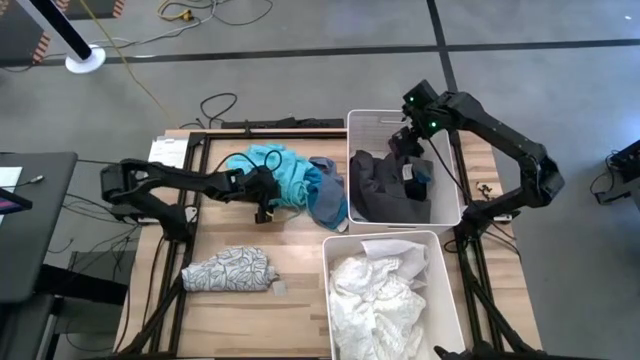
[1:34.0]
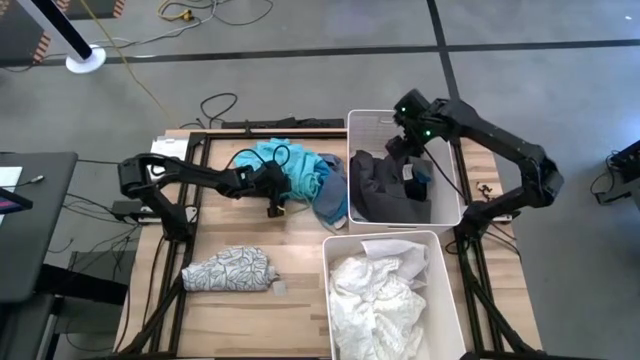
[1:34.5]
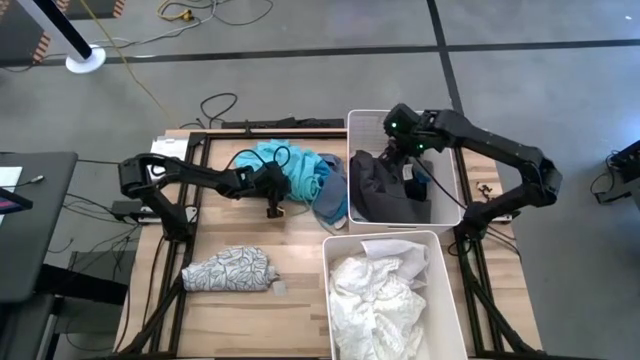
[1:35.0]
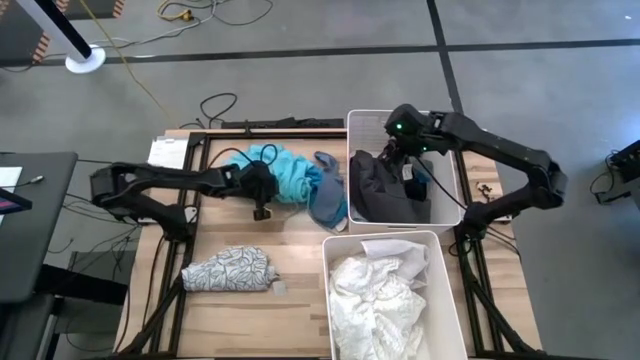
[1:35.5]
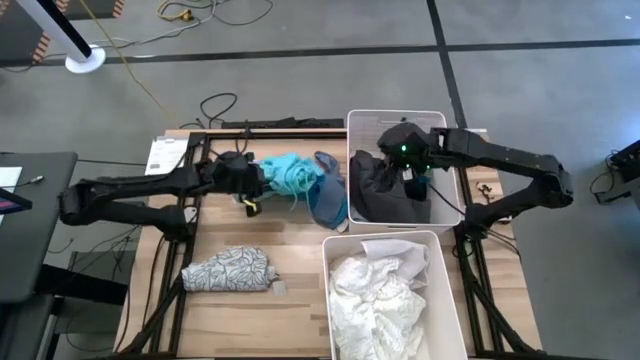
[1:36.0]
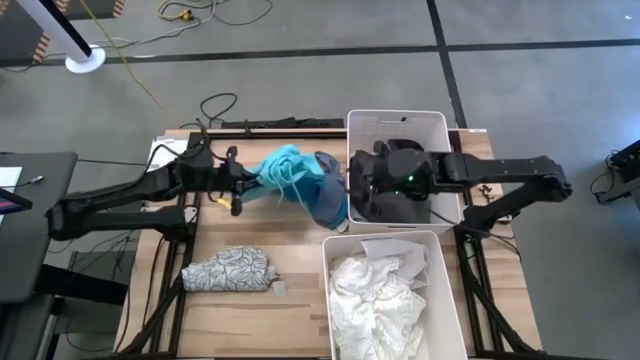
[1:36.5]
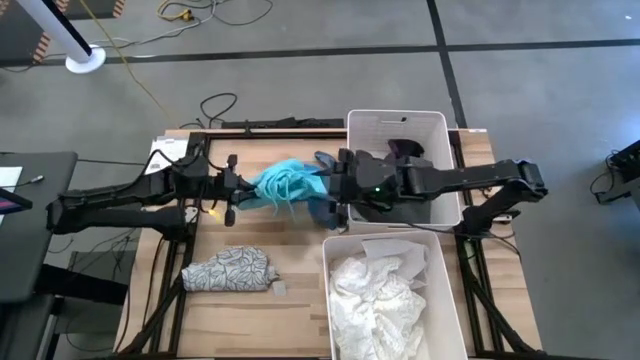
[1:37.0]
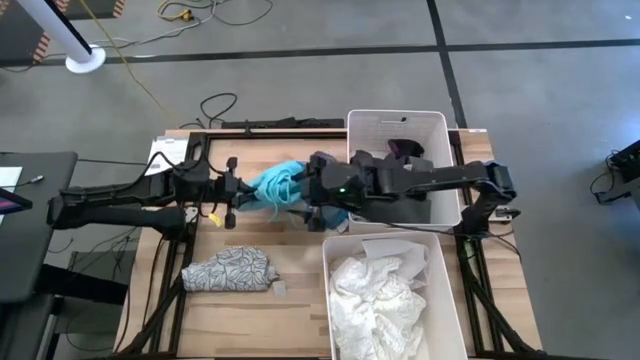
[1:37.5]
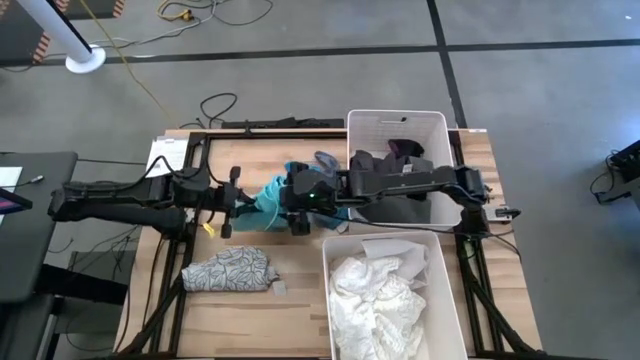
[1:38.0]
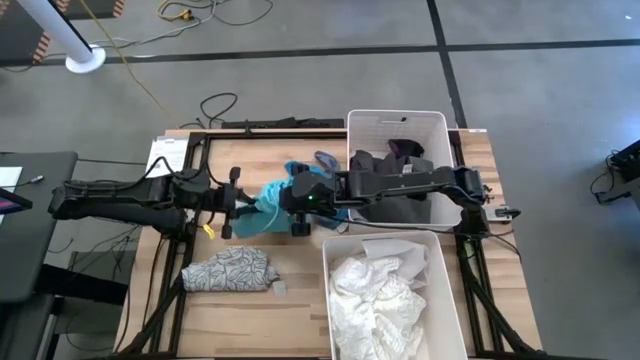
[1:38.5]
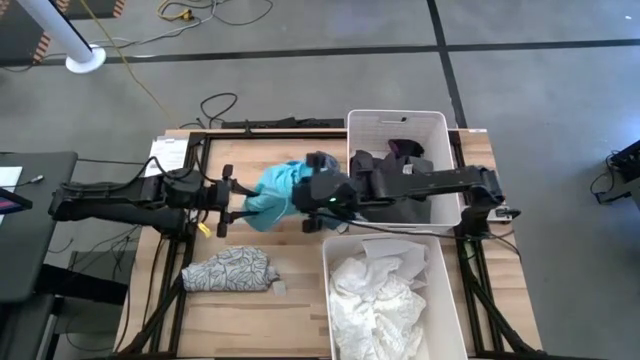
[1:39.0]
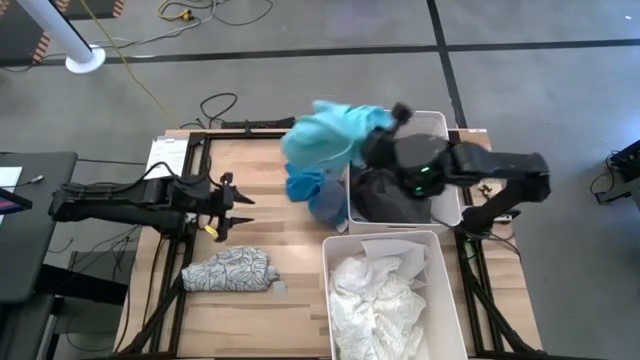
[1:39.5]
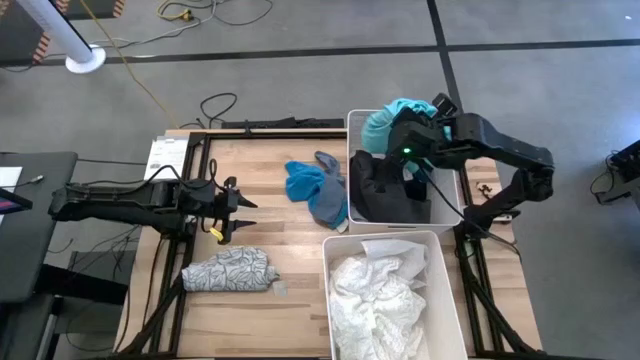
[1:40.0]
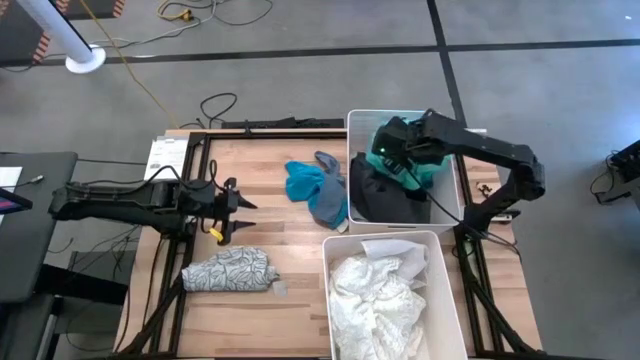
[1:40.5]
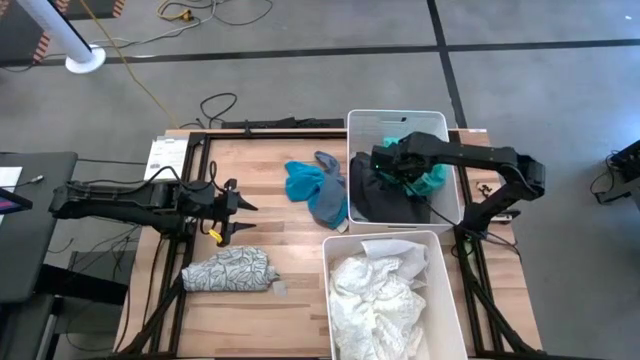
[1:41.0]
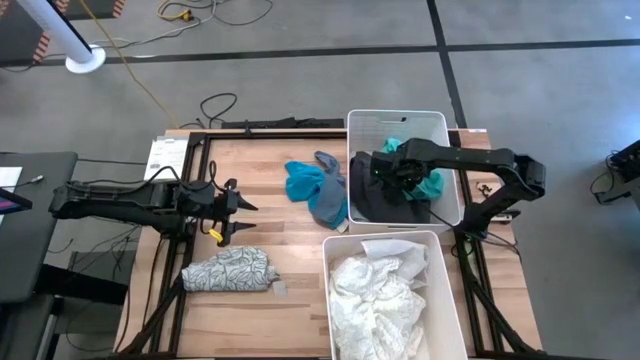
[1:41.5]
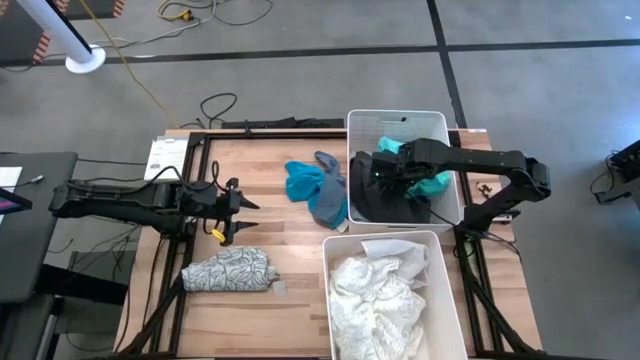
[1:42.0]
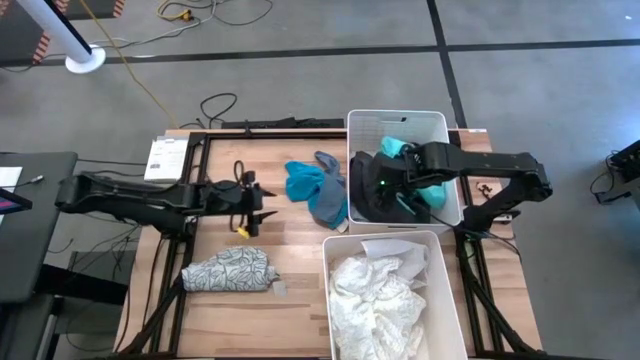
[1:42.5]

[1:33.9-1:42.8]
Task: Sort clothes
Put the light blue shorts into the top white laundry bin

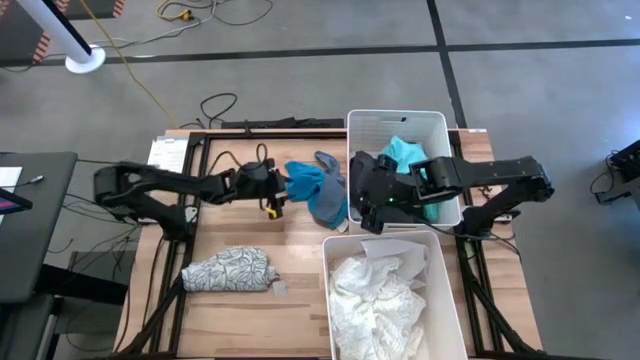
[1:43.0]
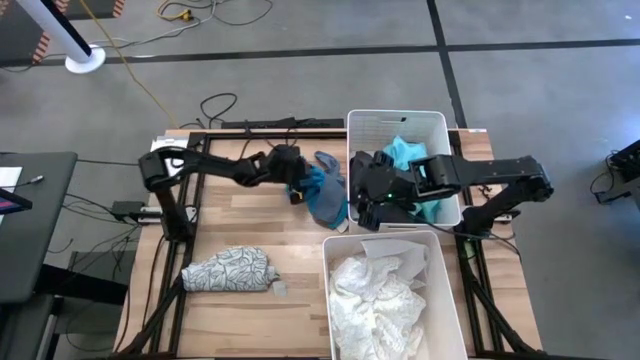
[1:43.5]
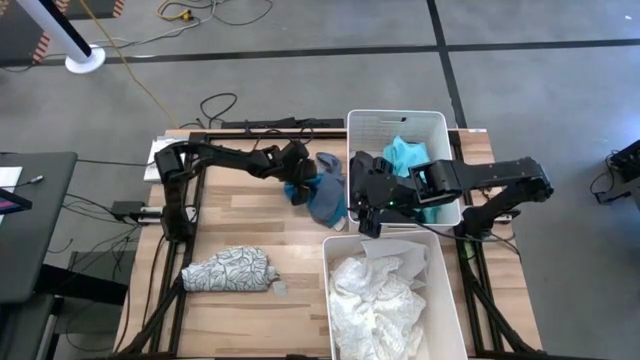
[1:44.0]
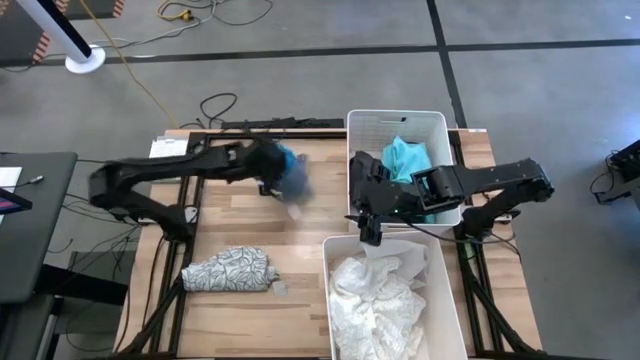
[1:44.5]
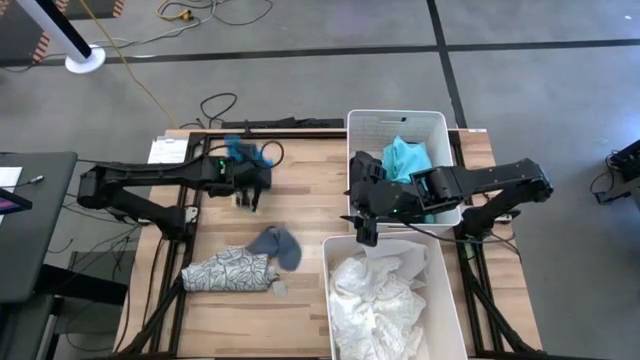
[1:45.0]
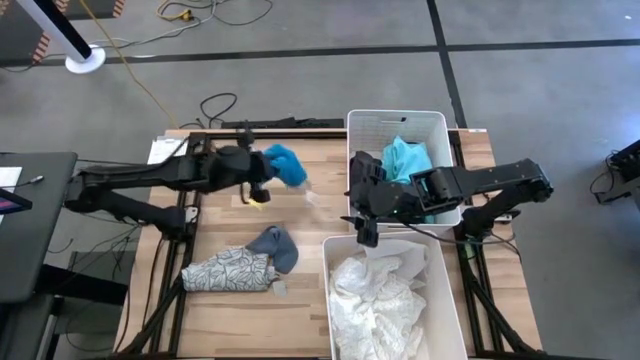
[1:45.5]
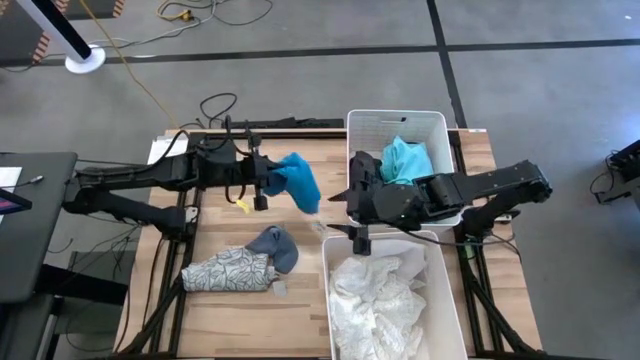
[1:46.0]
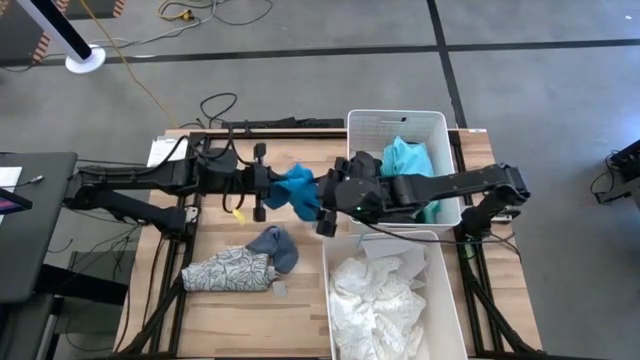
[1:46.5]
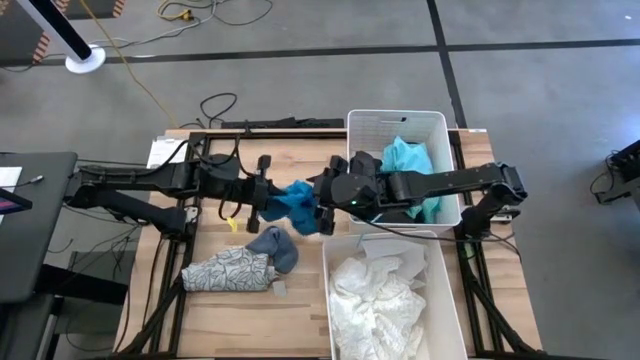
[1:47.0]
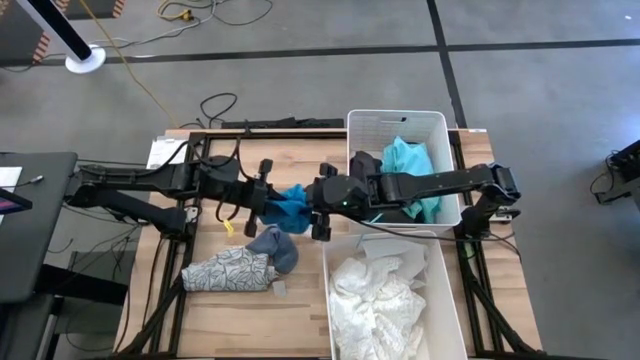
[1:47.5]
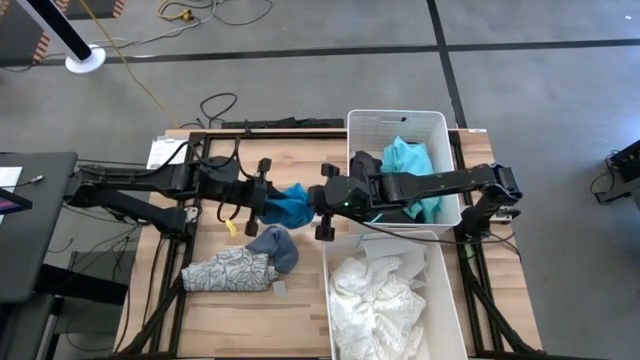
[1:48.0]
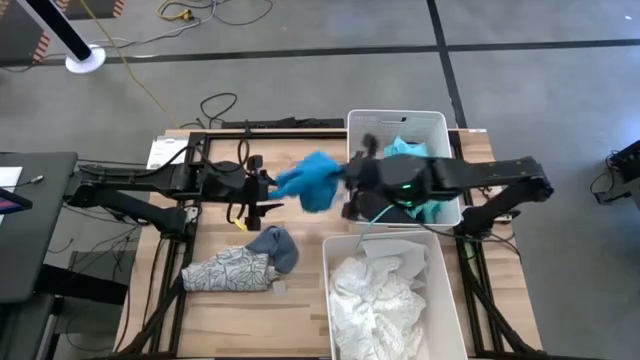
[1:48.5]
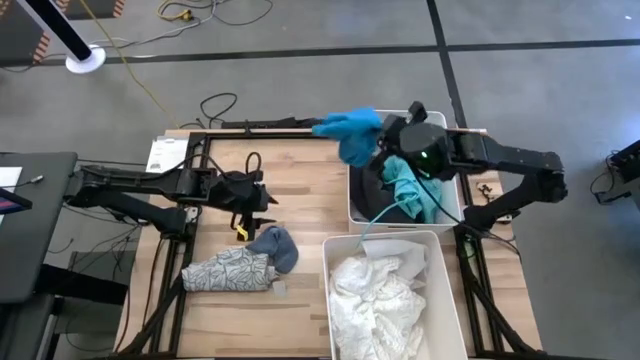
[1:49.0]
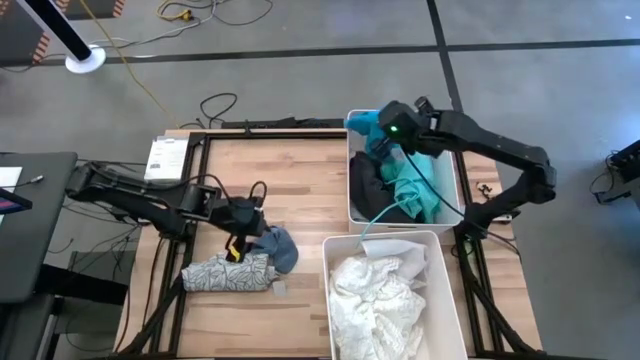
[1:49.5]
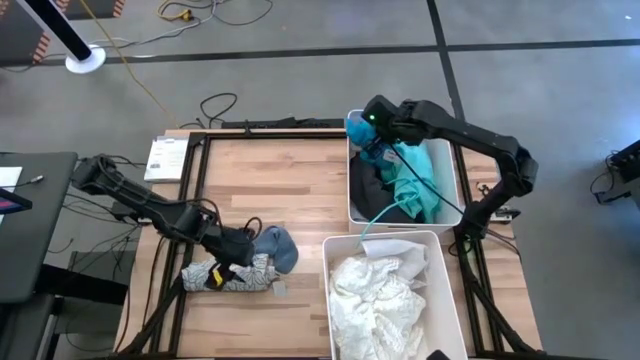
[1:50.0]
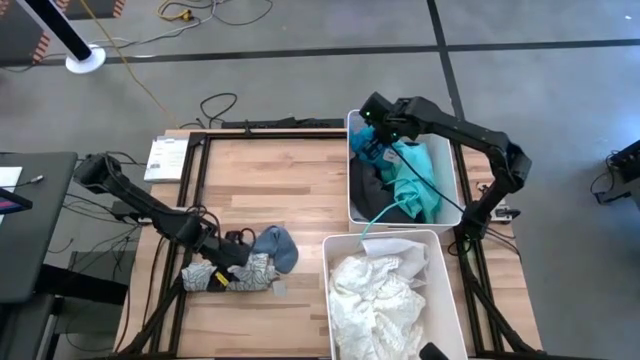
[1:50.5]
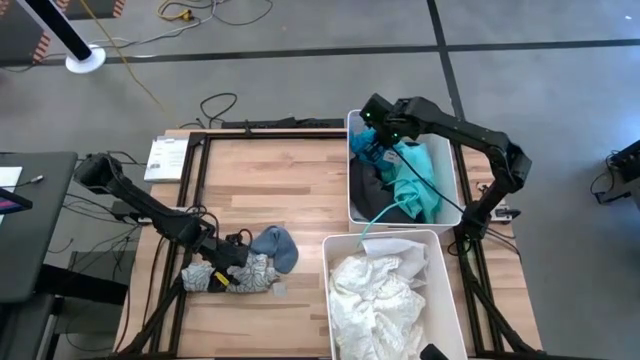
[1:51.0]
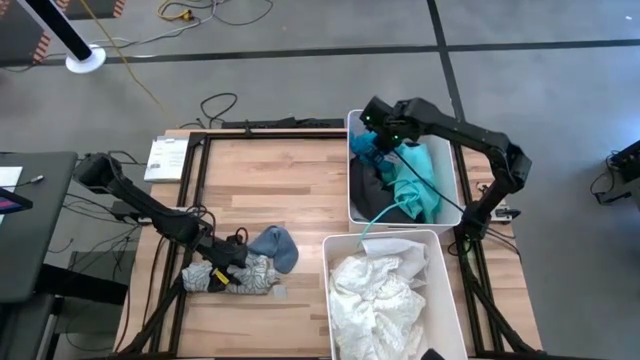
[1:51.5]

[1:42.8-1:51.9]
Put the blue short into the top white laundry bin

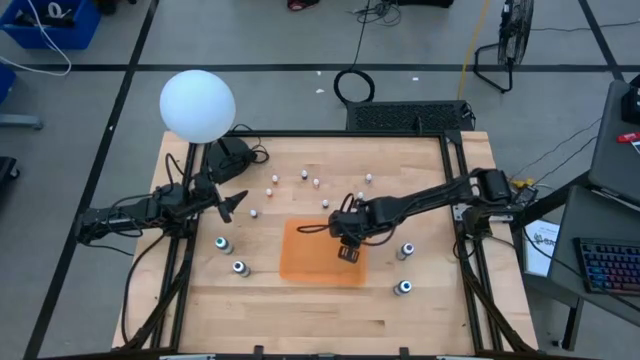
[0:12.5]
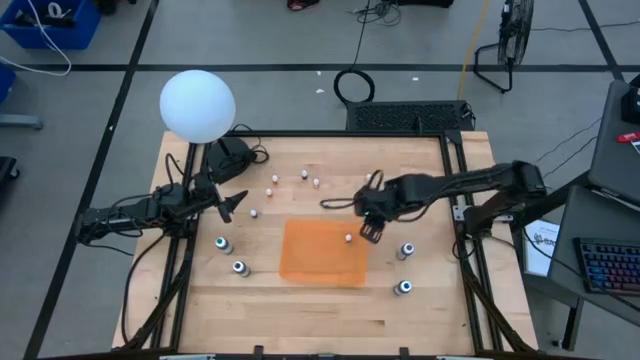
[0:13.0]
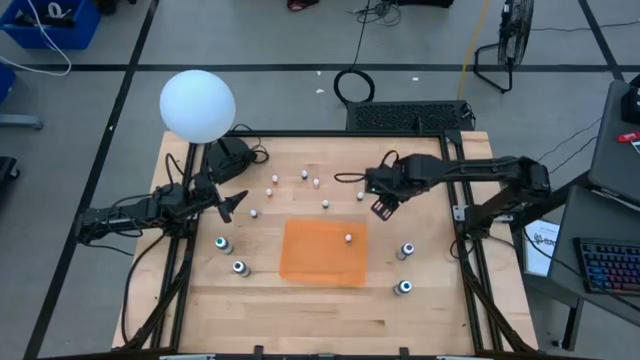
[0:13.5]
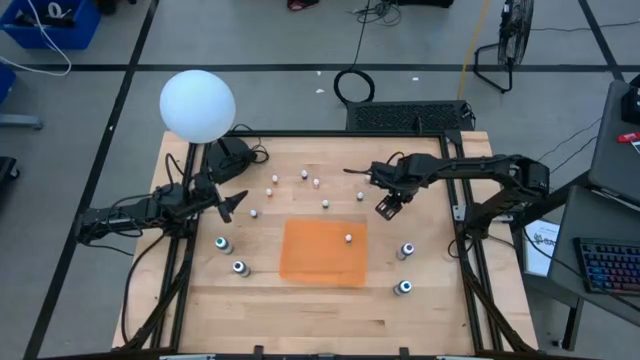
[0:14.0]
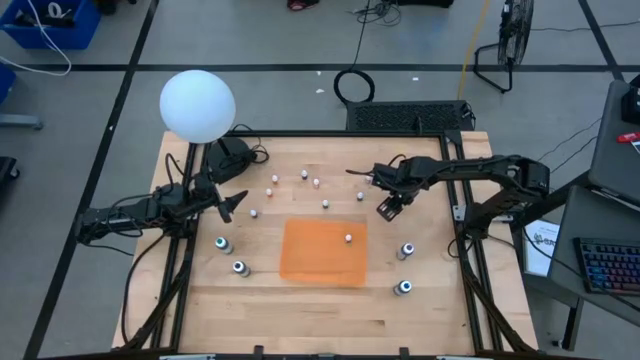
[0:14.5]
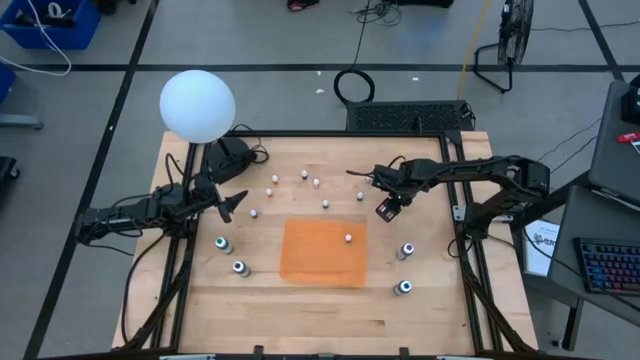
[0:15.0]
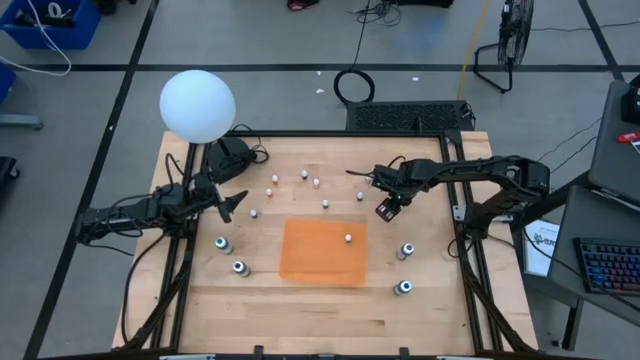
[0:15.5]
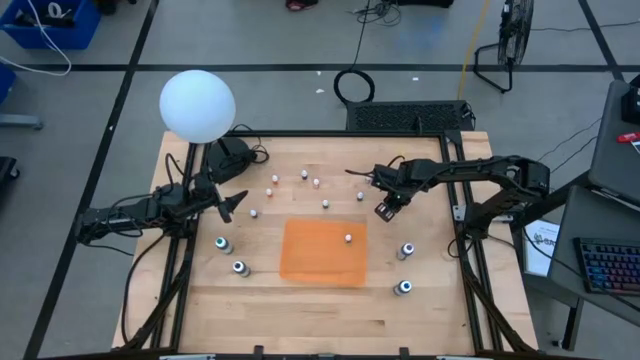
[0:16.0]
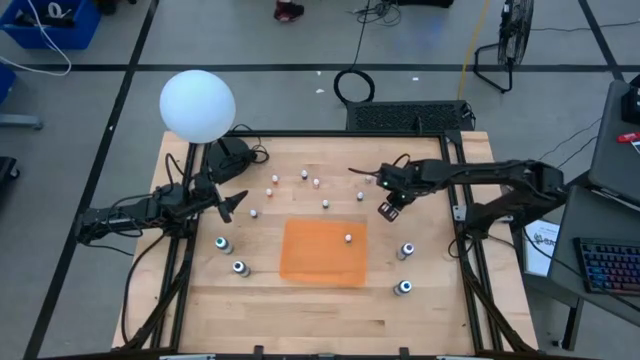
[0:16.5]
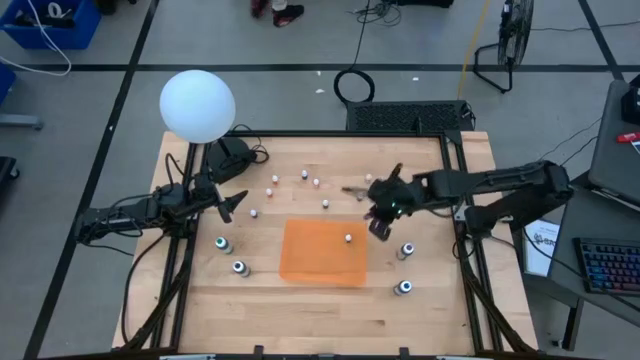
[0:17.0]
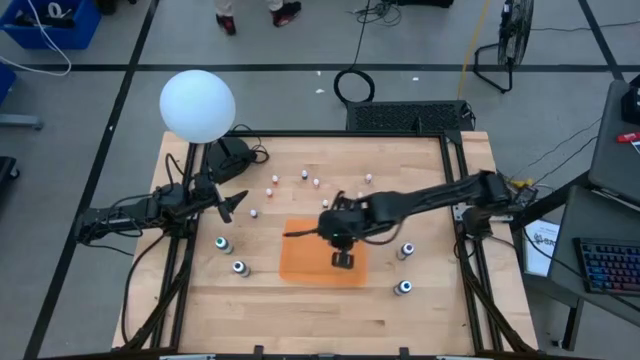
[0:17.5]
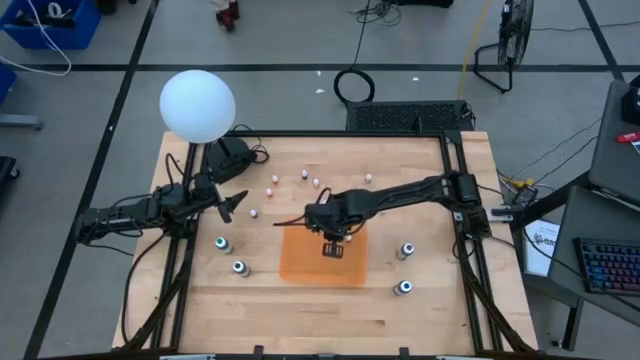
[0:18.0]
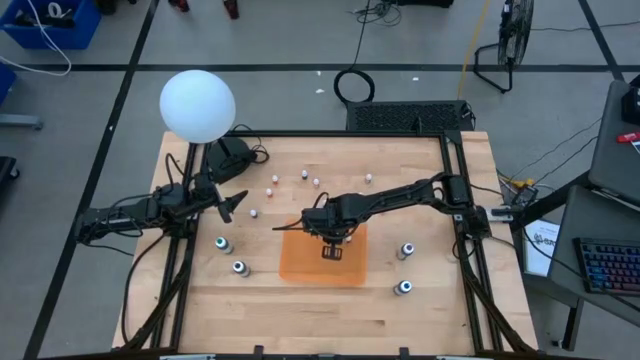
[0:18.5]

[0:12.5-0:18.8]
Task: Pick & Place food coloring
Put the right purple food coloring bottle into the orange bin
